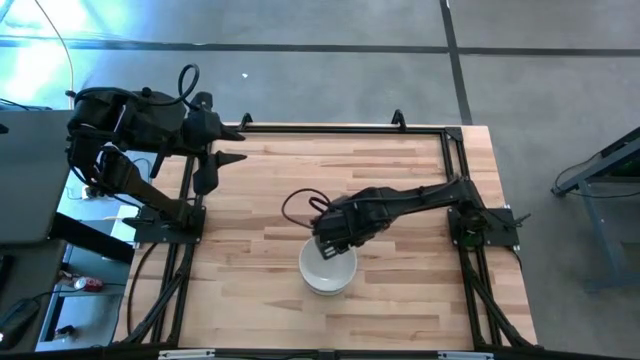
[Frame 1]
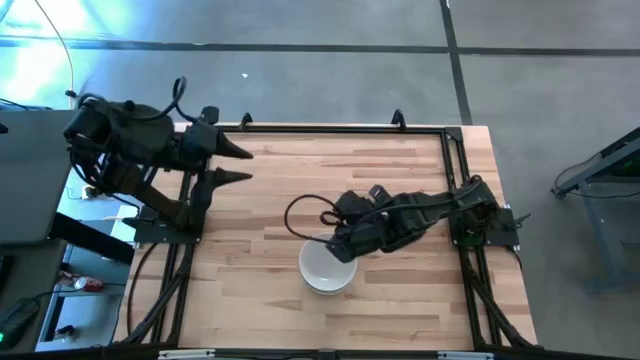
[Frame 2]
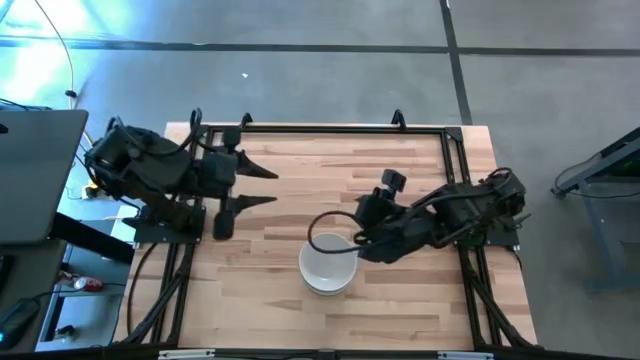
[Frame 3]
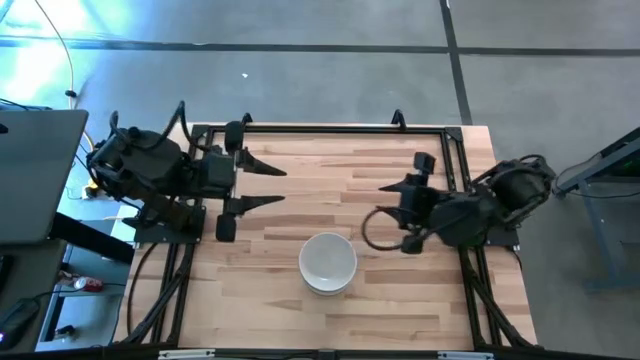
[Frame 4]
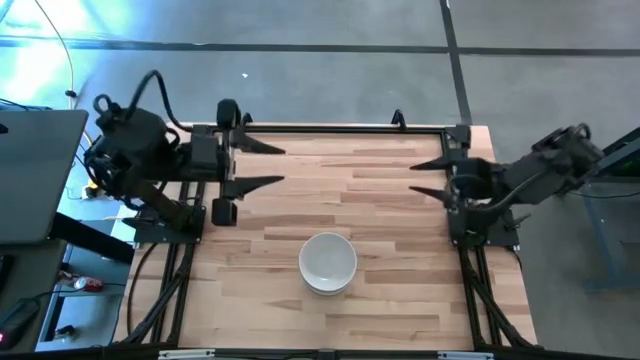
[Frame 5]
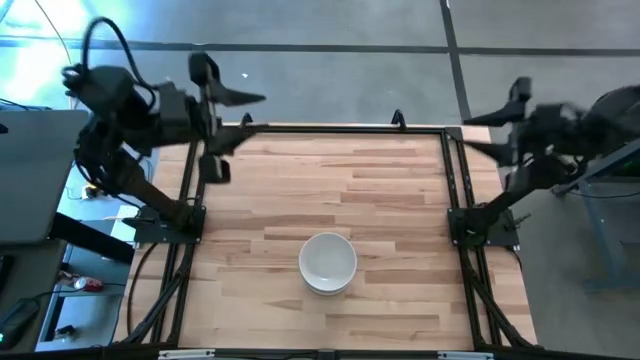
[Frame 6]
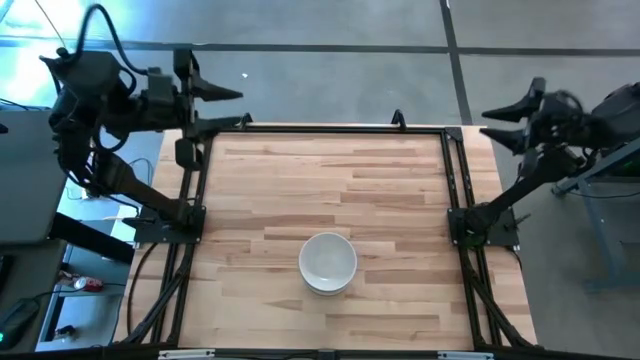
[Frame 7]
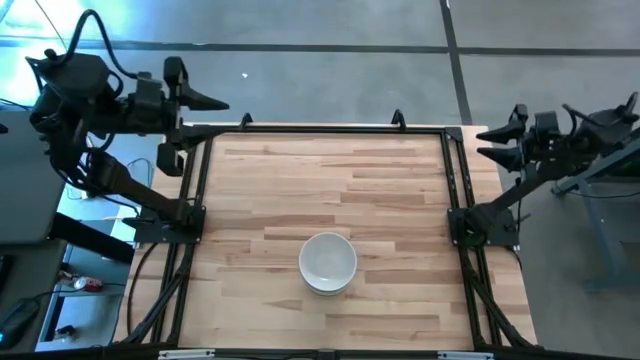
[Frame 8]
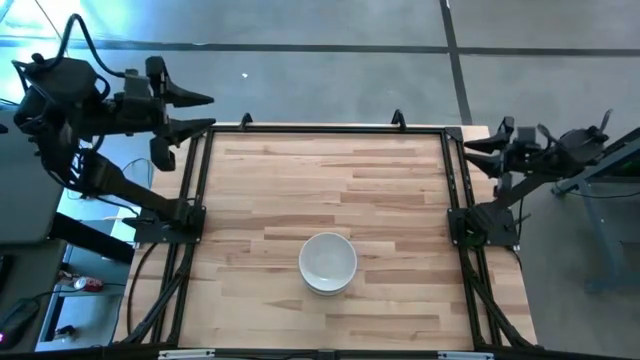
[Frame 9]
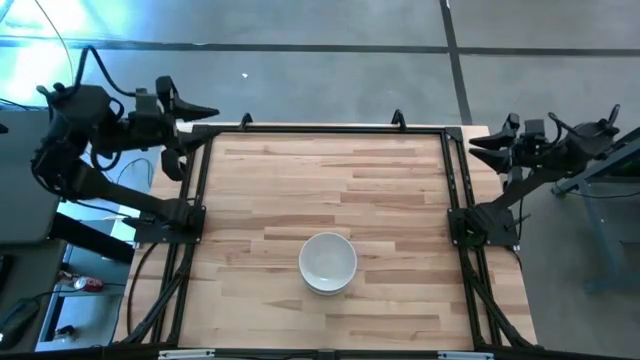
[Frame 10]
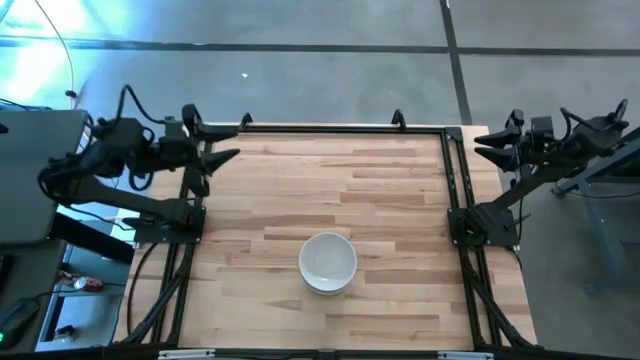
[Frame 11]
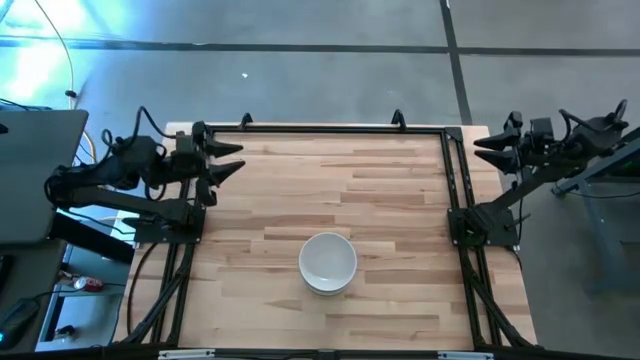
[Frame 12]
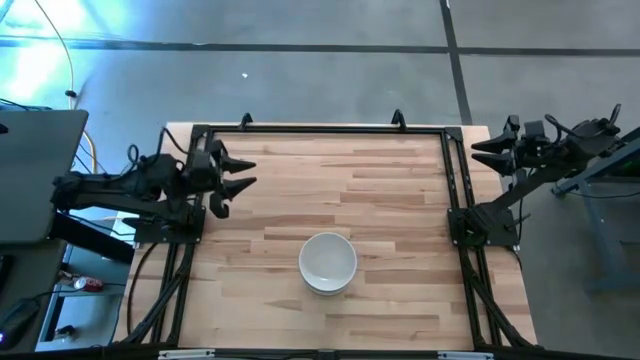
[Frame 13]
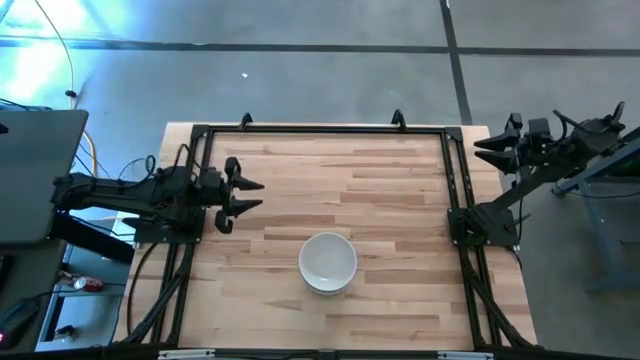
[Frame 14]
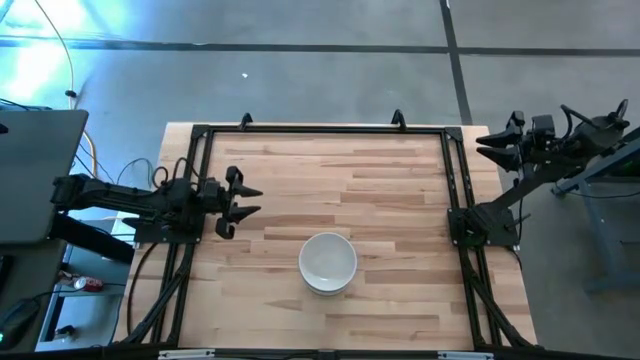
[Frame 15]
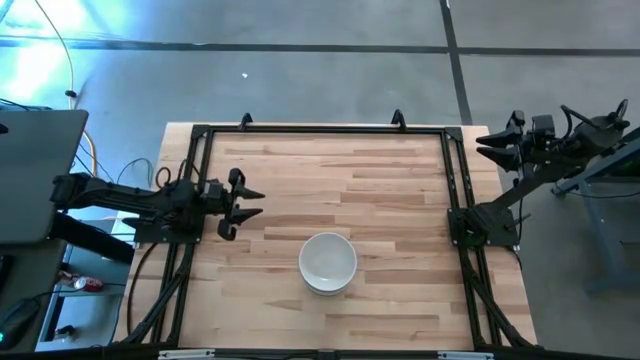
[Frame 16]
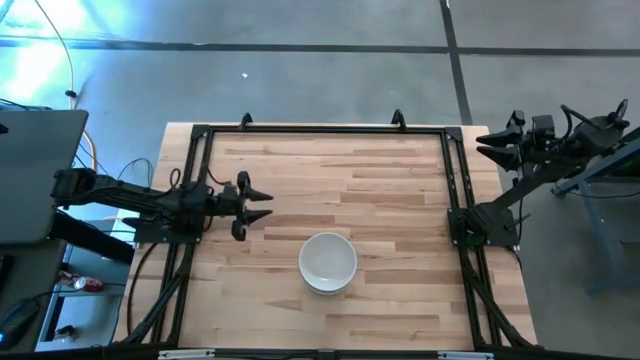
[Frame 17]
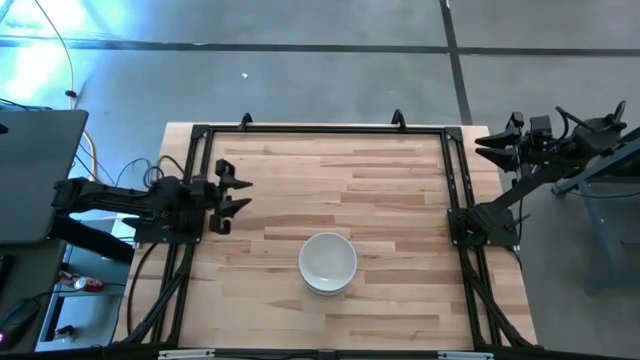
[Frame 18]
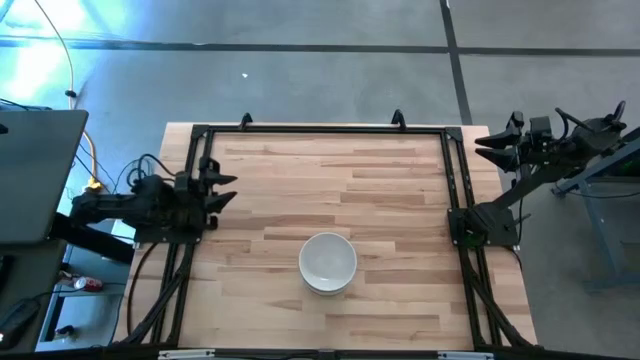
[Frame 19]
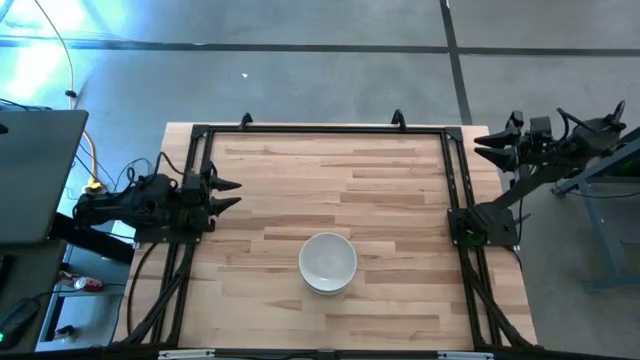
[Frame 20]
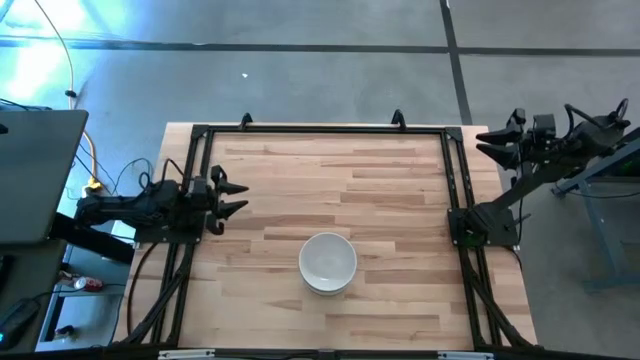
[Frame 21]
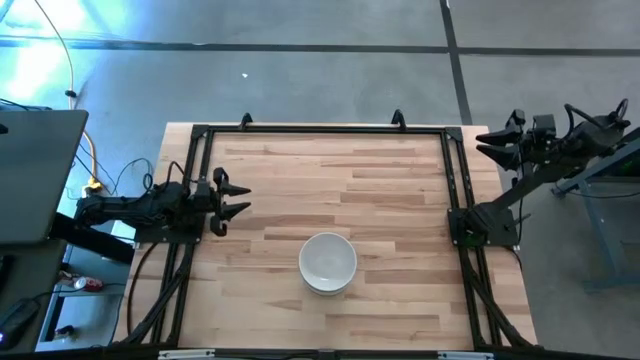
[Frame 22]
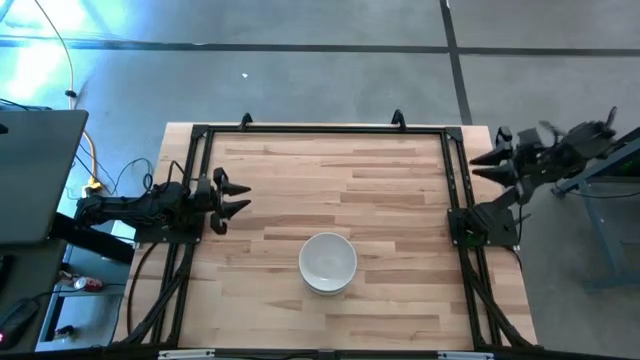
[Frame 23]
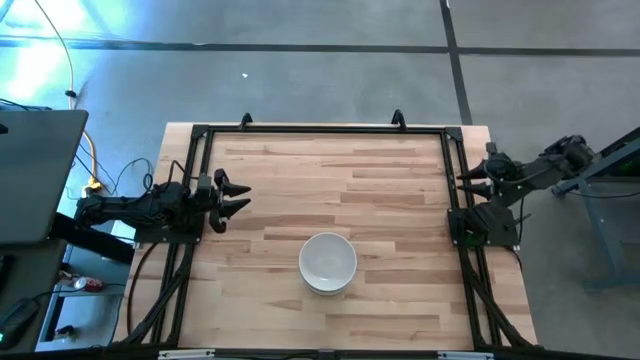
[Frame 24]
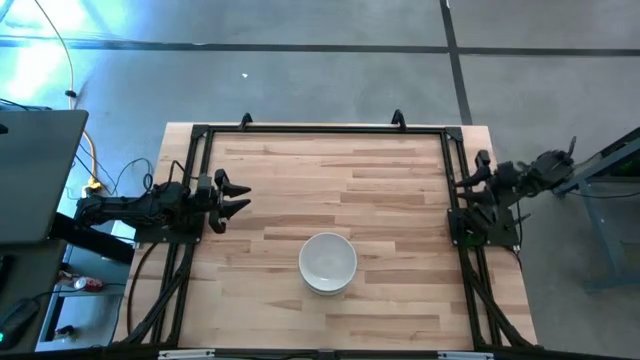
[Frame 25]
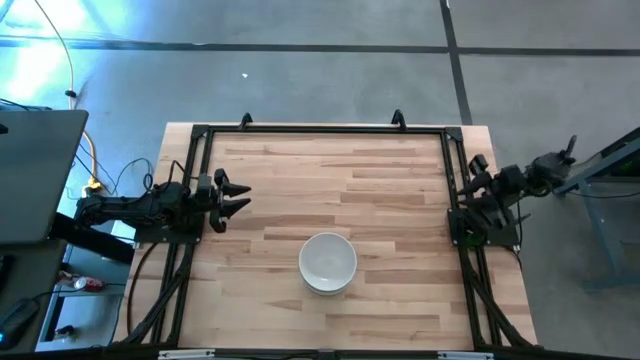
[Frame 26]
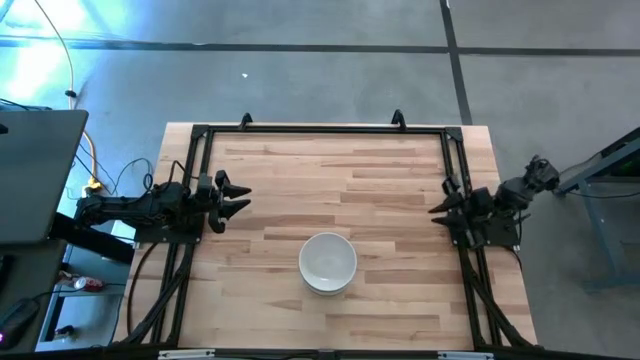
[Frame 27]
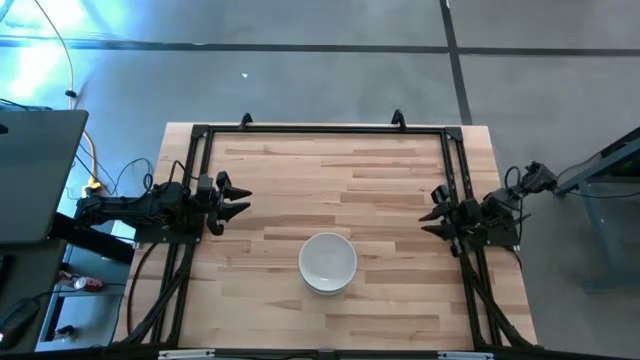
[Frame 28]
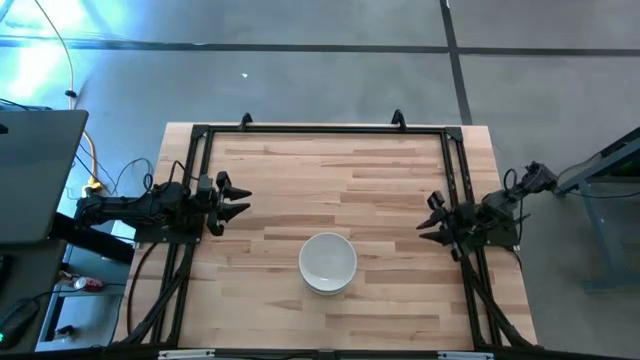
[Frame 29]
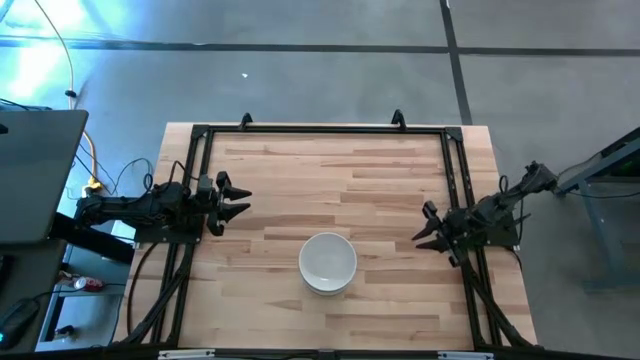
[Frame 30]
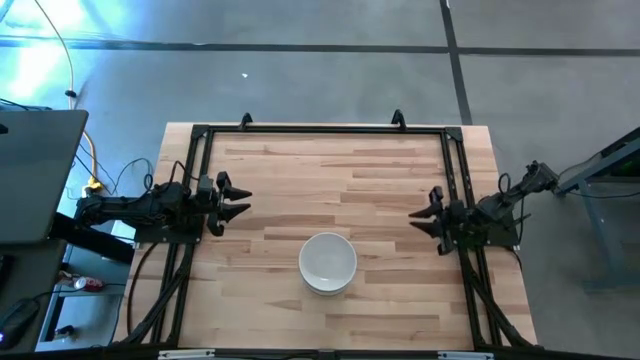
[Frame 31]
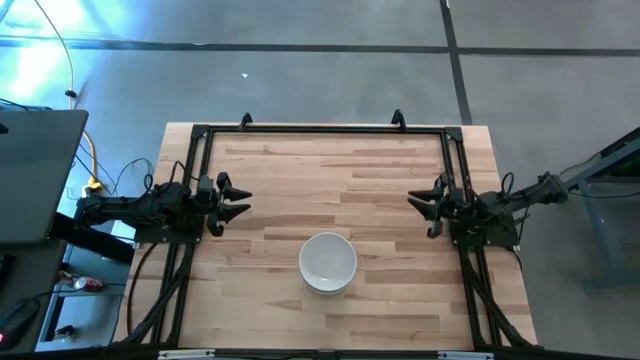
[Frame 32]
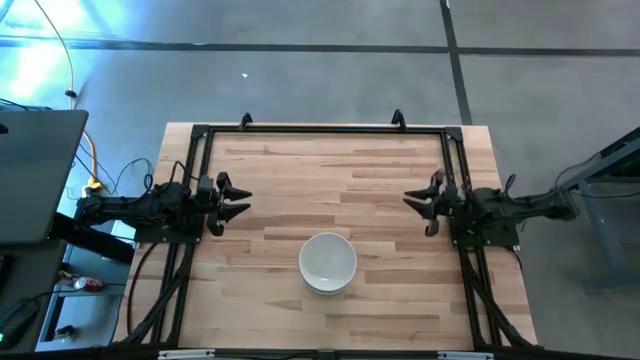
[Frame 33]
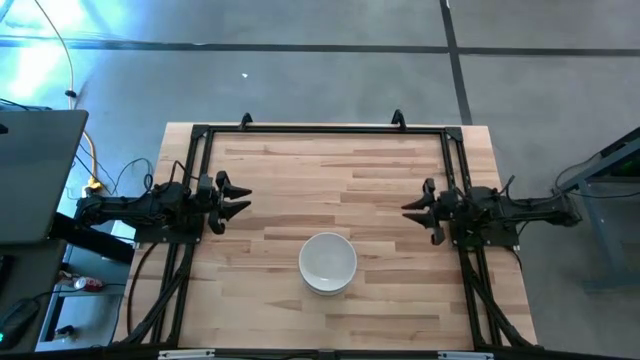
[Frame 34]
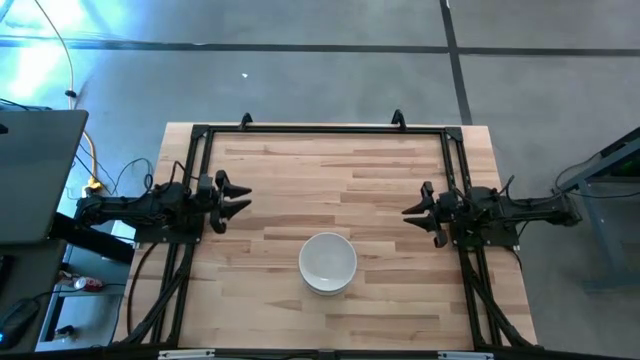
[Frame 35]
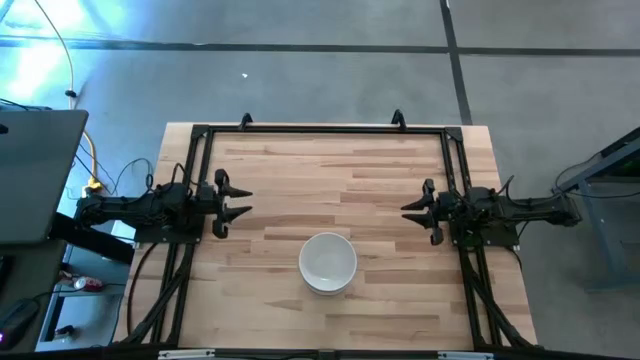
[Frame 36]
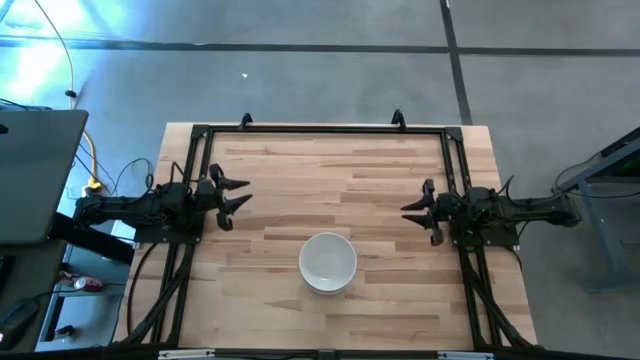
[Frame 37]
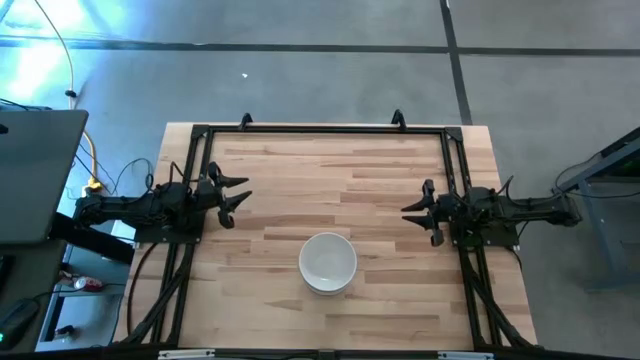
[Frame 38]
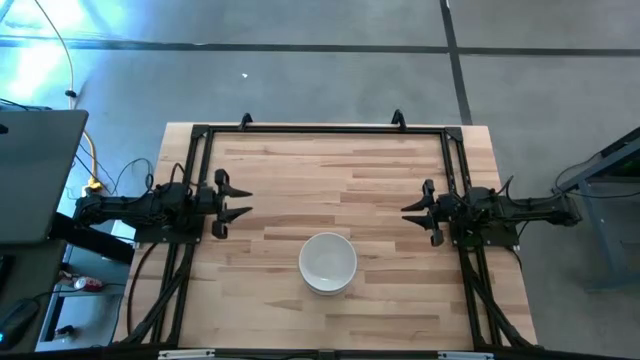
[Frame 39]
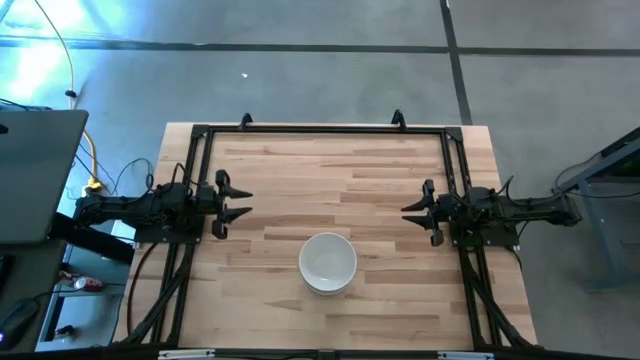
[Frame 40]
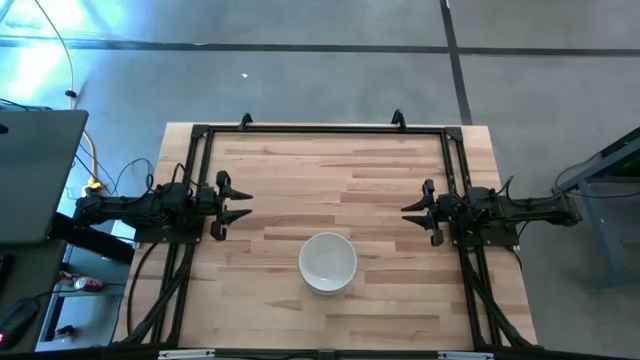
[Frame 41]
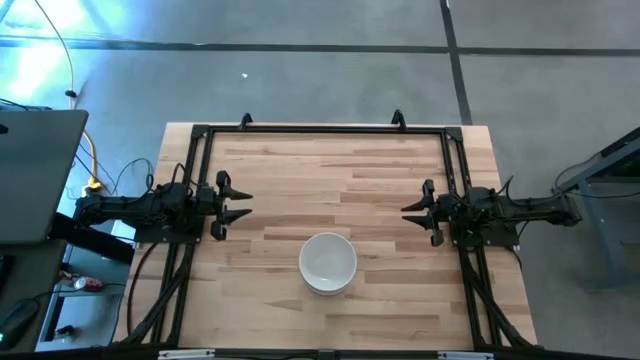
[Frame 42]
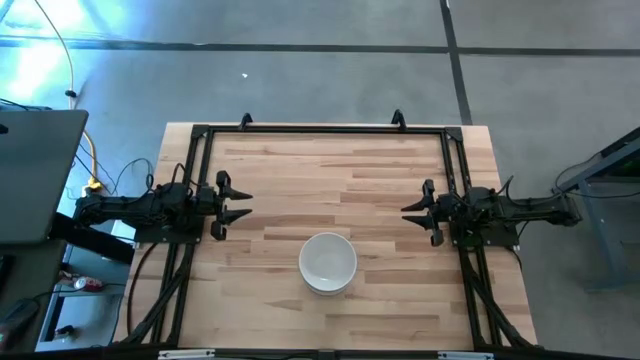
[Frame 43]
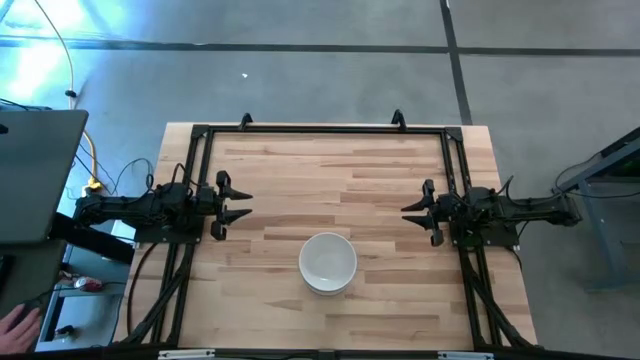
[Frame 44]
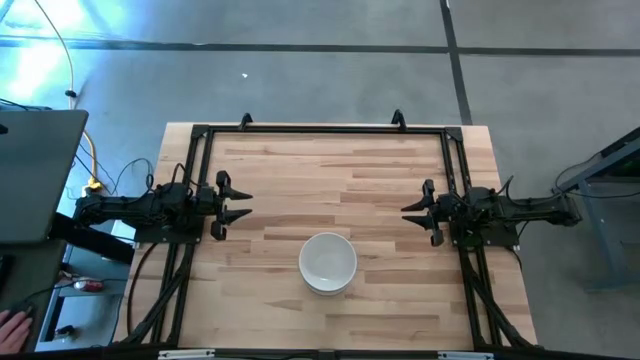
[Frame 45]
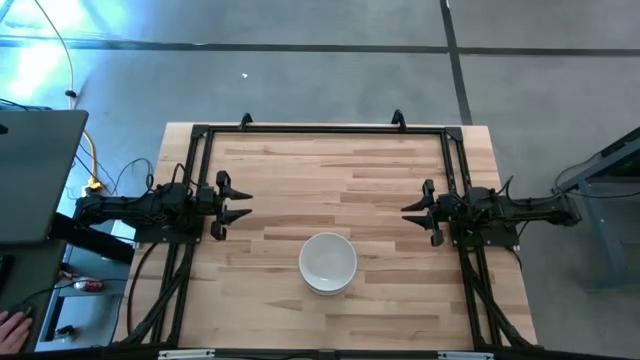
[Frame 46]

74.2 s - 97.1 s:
Task: Nest bowls inside each other
Return to Home Position
